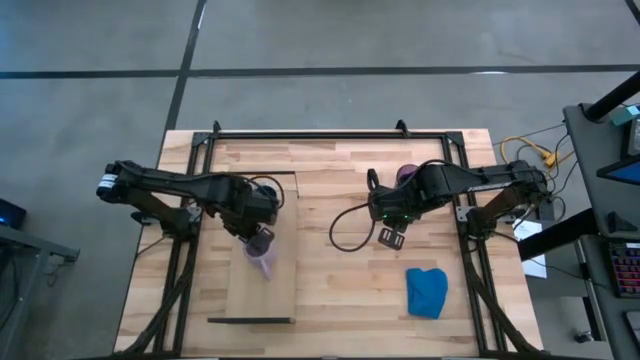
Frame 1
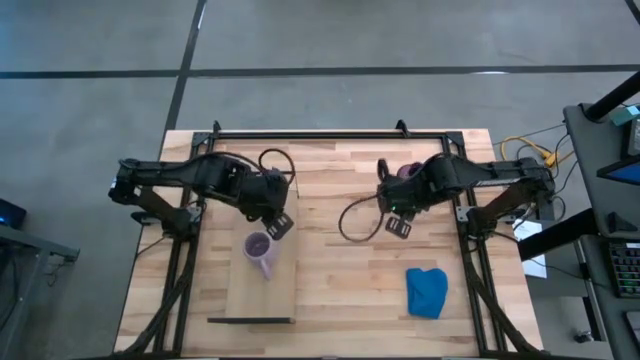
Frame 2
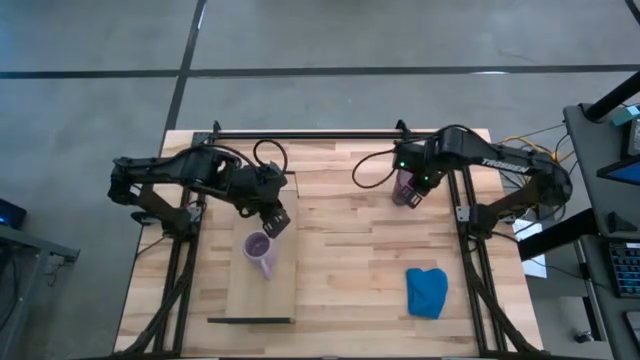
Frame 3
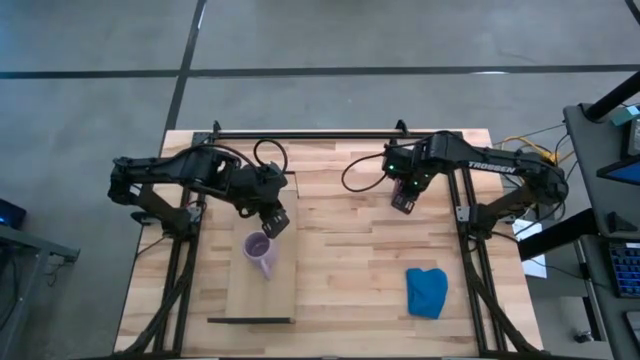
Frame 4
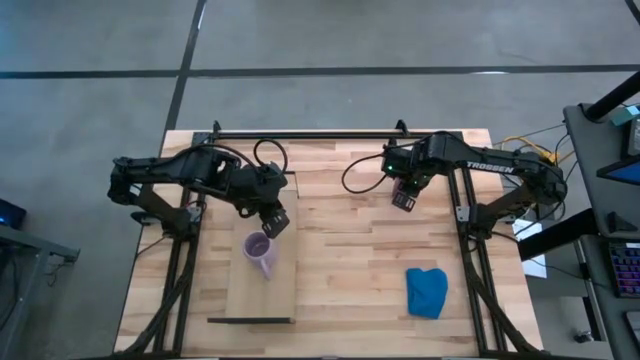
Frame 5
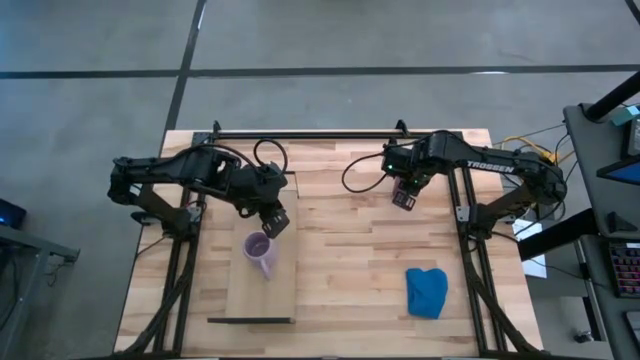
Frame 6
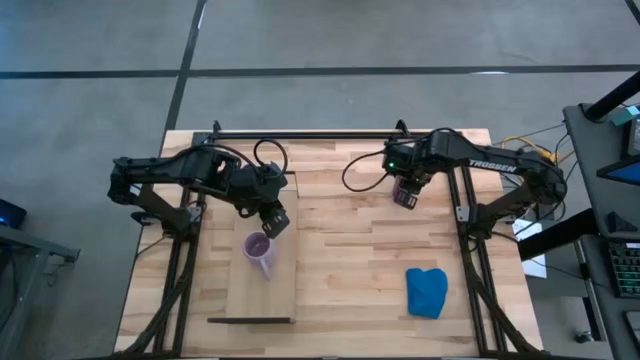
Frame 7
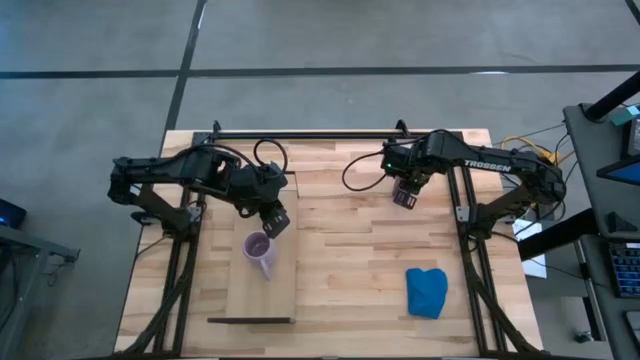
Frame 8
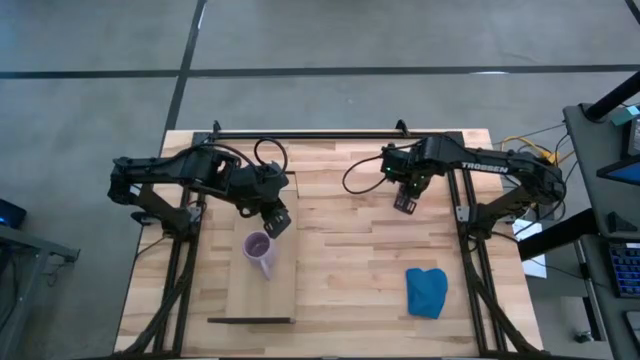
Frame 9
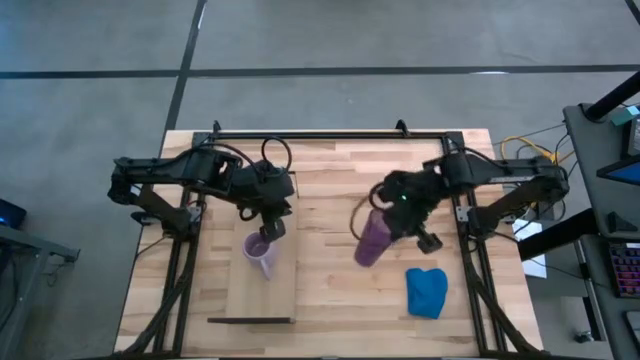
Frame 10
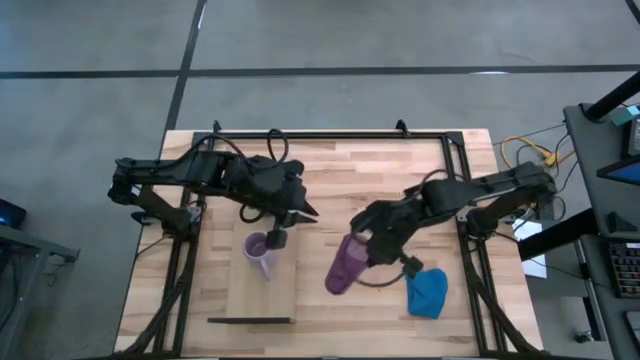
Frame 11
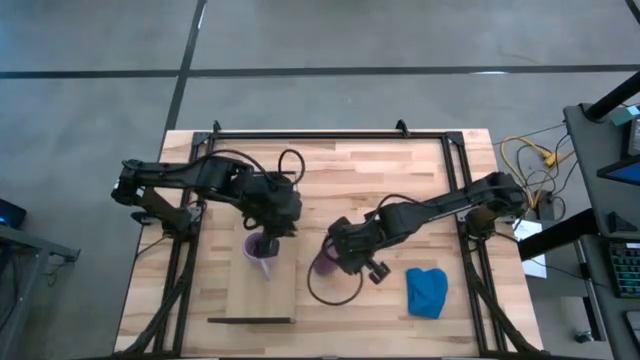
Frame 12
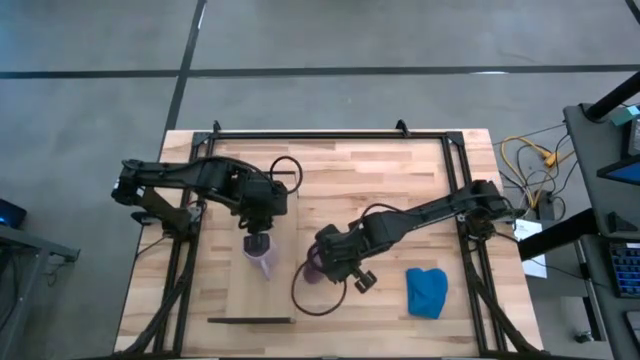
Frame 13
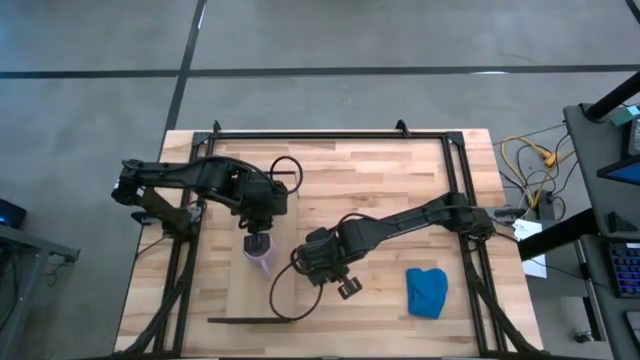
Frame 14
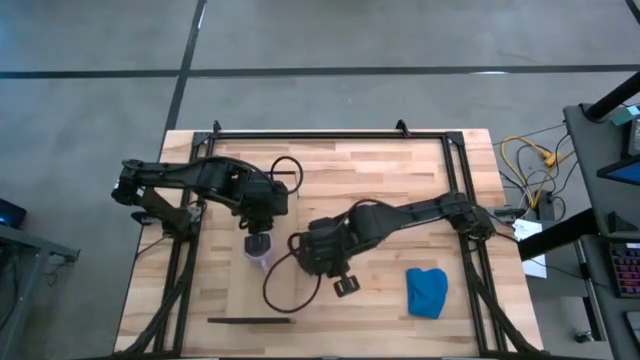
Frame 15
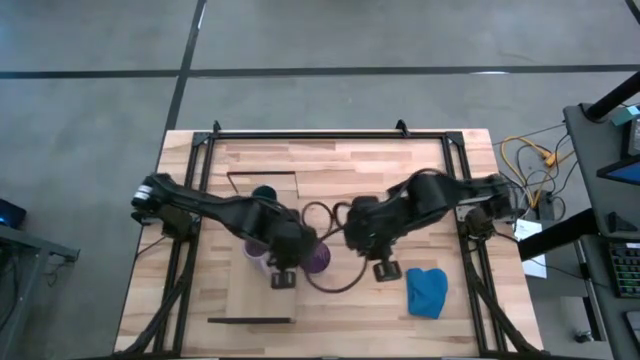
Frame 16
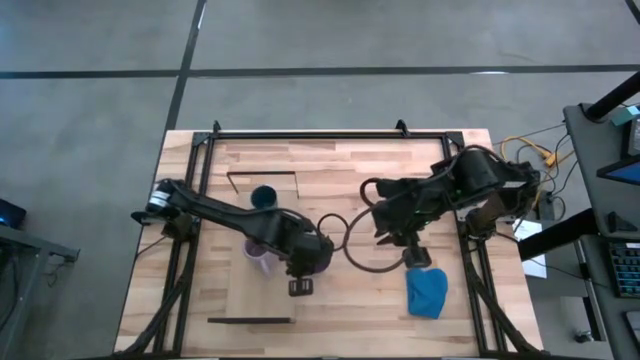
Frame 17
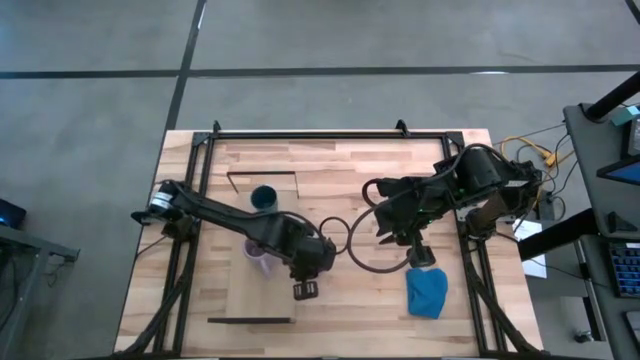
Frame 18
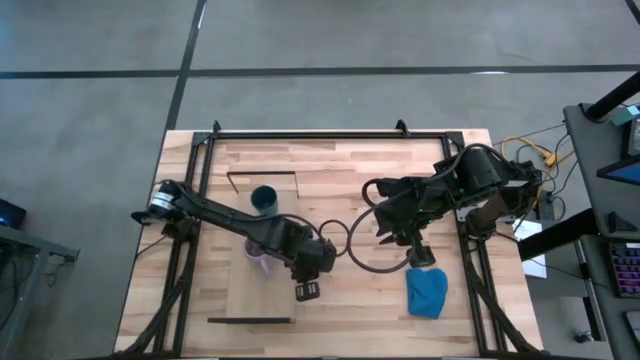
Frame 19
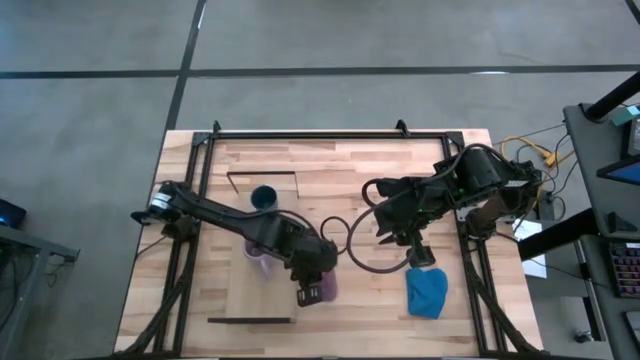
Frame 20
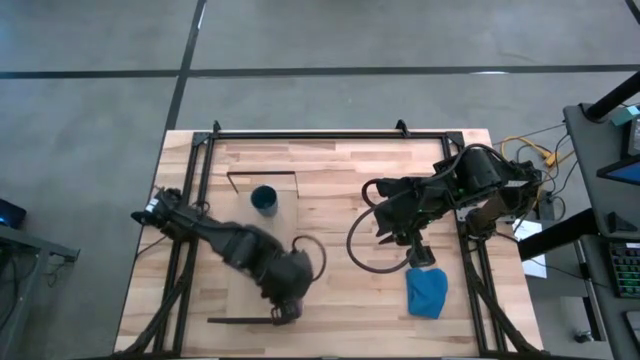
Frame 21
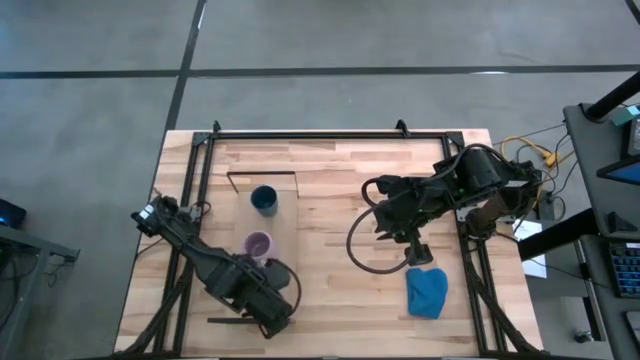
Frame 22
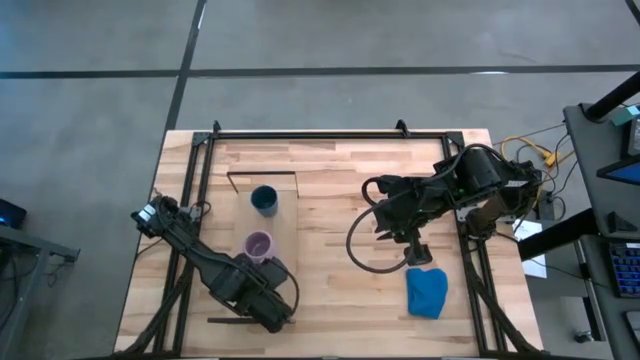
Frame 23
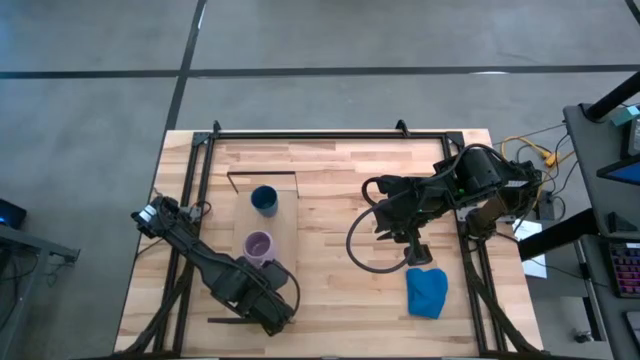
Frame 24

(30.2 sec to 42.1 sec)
Task: Stack small to large cups/mugs on shelf
Put the purple cup on the shelf

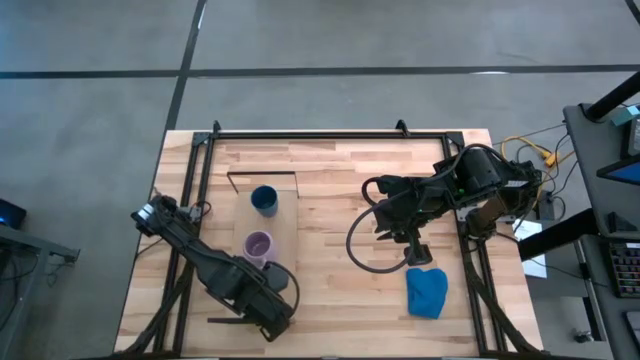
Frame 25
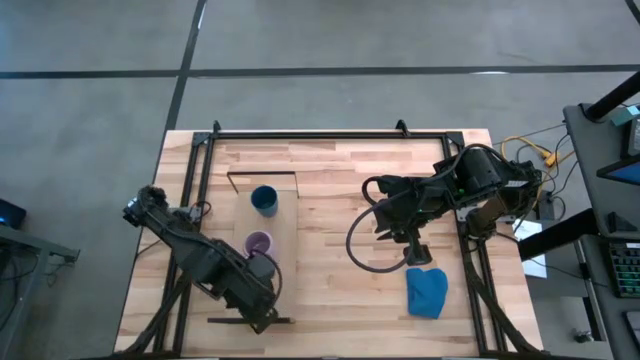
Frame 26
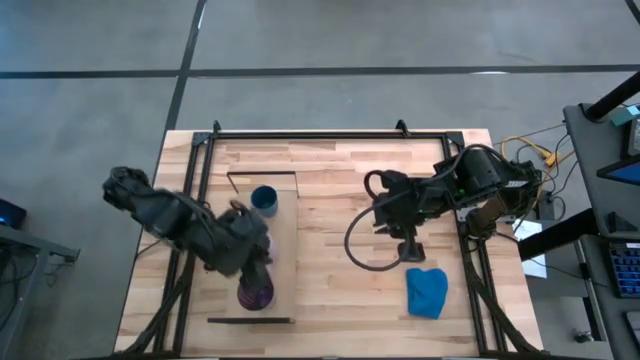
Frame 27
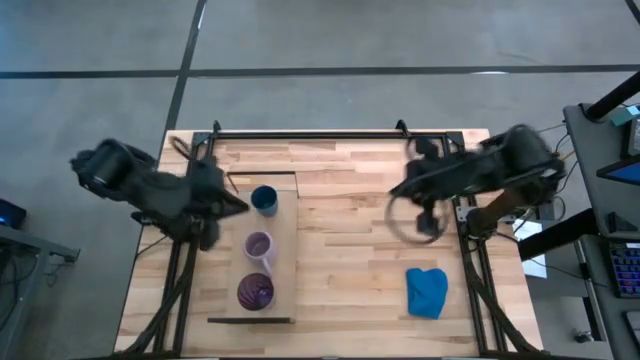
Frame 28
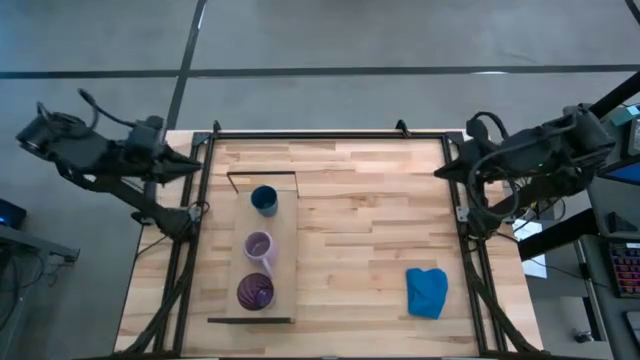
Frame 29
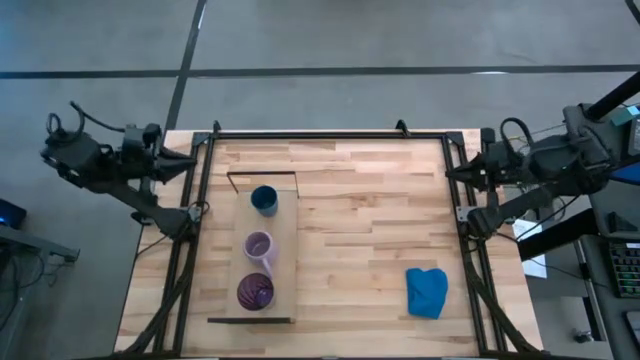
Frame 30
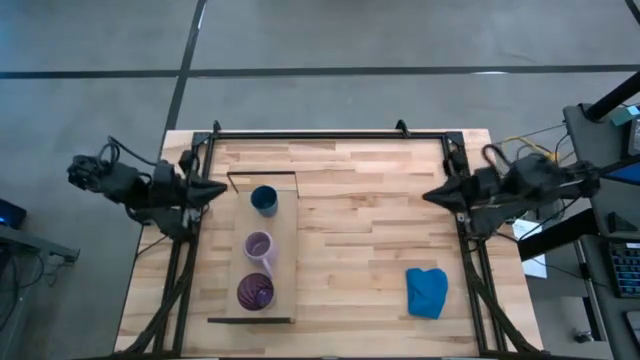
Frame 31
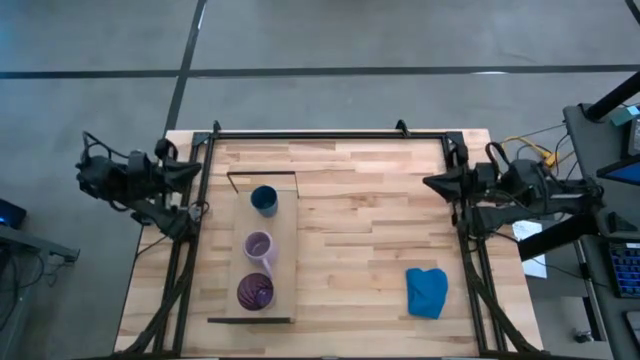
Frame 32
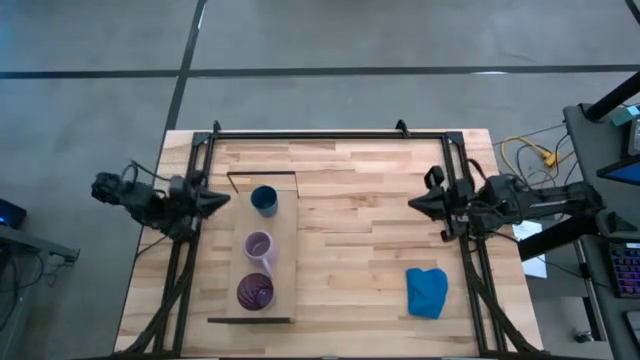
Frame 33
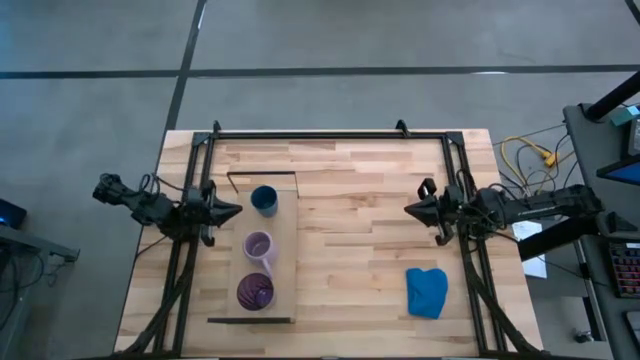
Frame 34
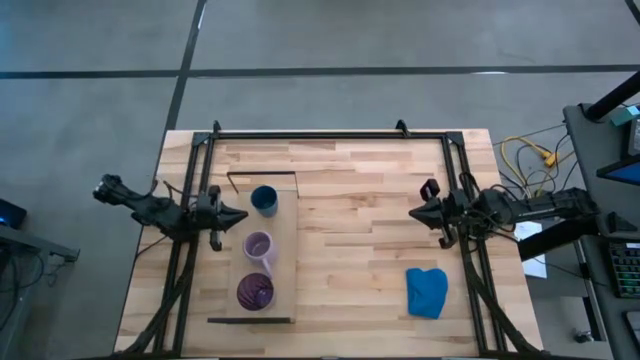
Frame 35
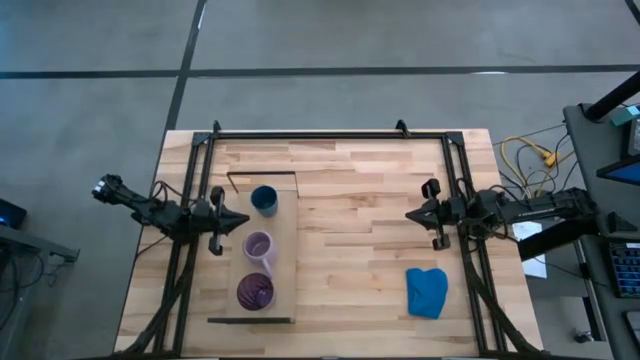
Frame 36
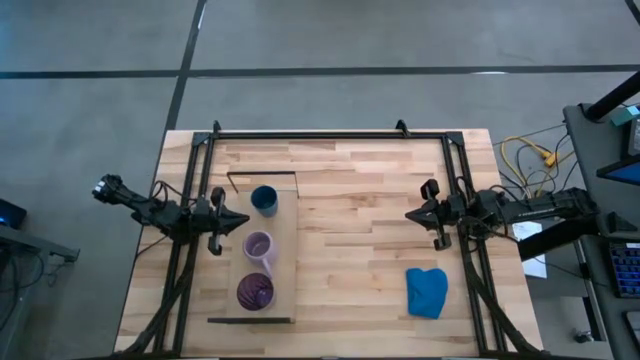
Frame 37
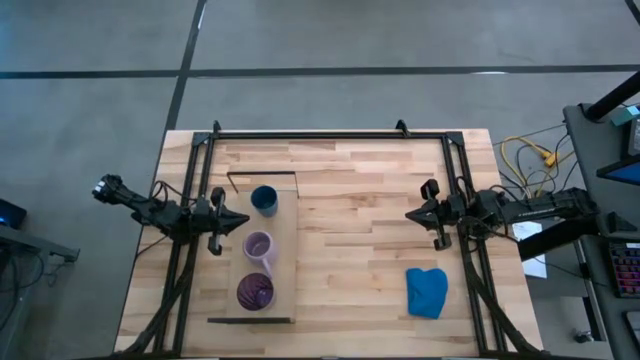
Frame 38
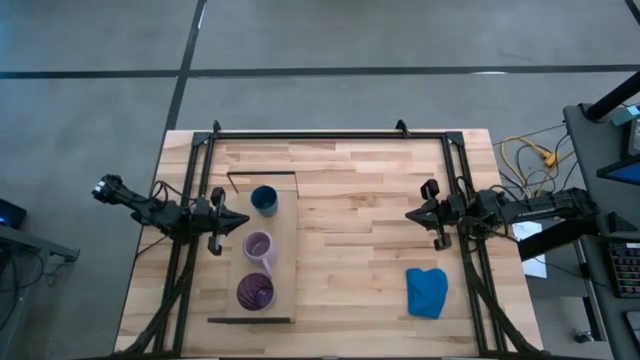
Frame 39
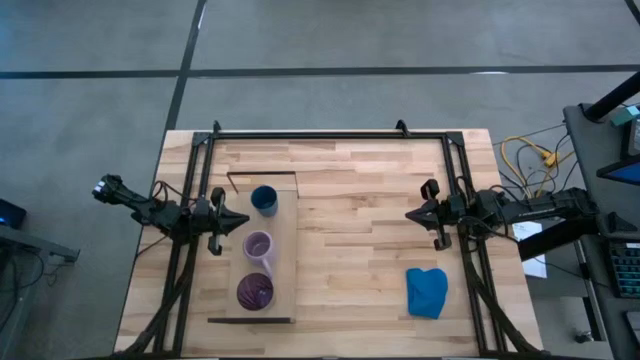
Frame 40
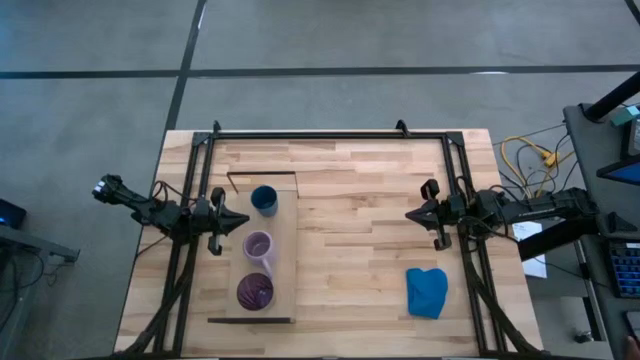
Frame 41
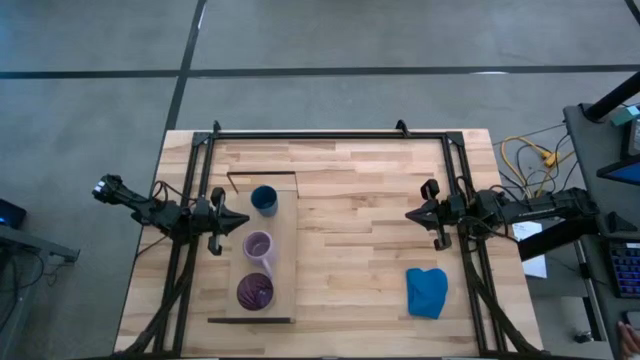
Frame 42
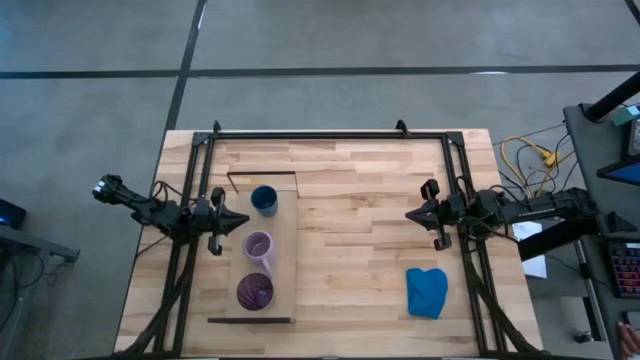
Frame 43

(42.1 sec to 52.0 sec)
Return to Home Position
